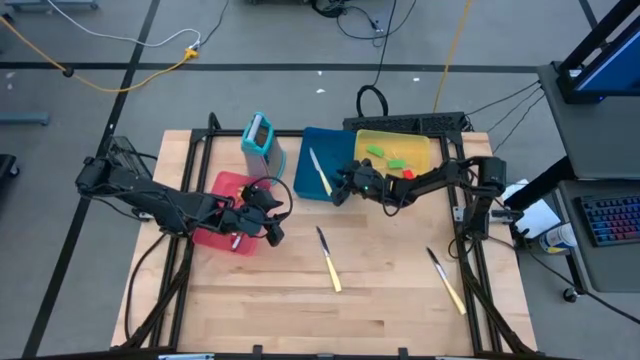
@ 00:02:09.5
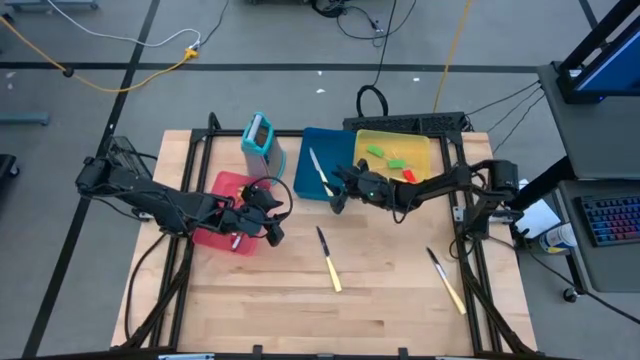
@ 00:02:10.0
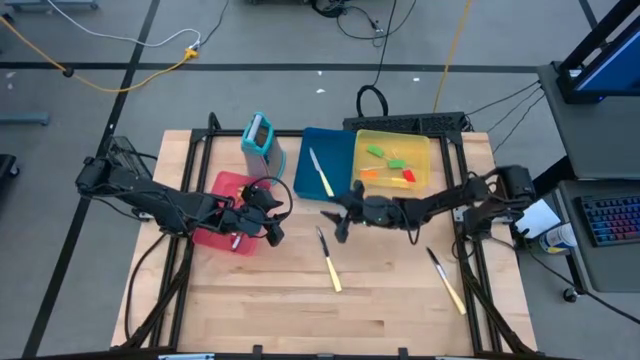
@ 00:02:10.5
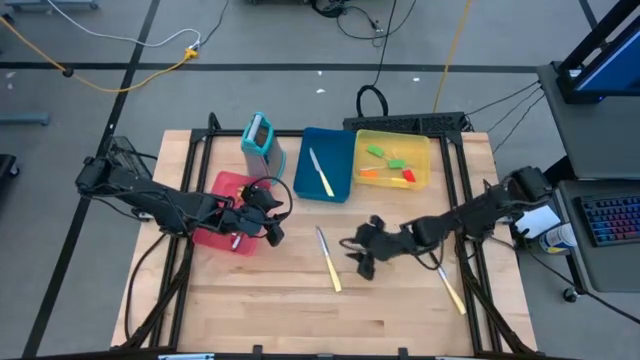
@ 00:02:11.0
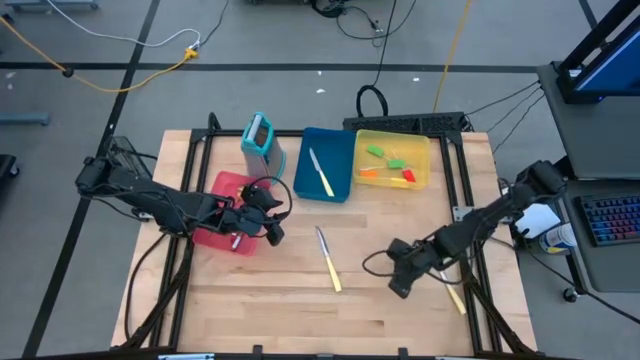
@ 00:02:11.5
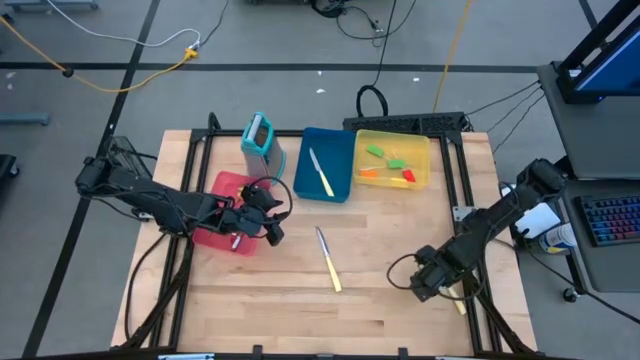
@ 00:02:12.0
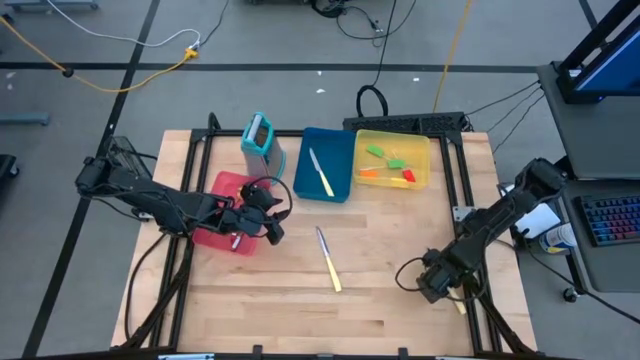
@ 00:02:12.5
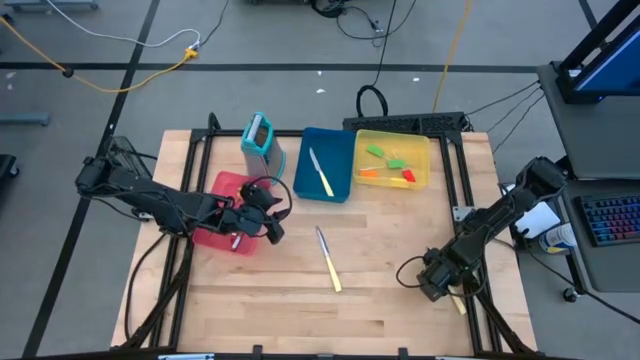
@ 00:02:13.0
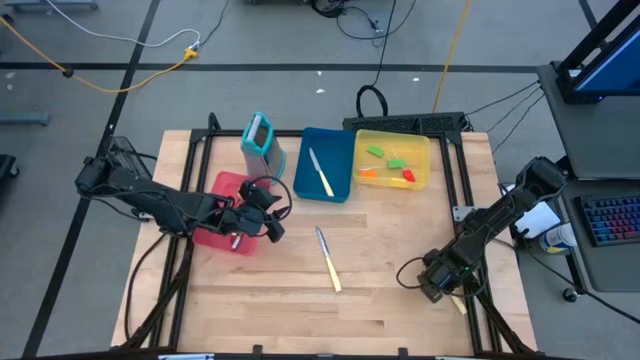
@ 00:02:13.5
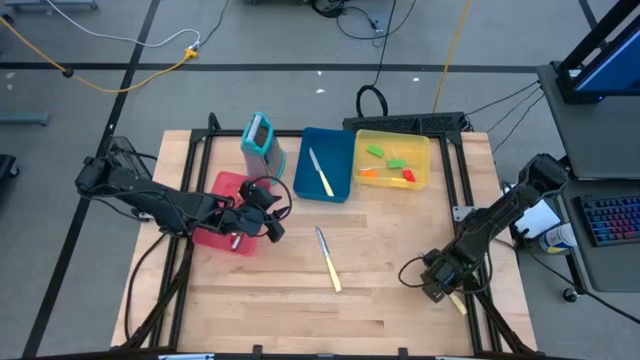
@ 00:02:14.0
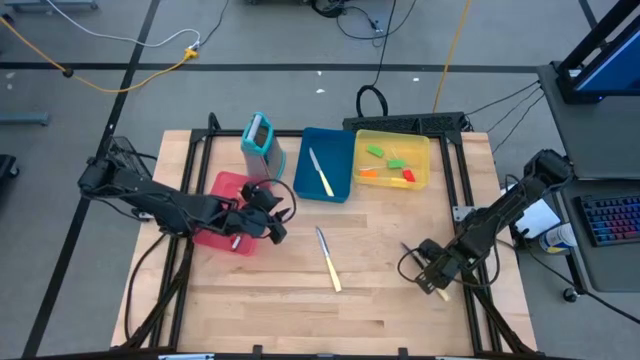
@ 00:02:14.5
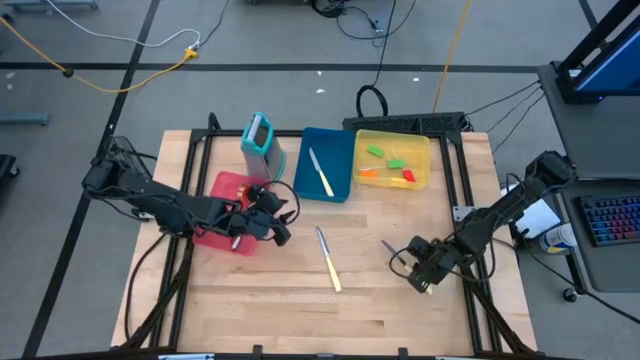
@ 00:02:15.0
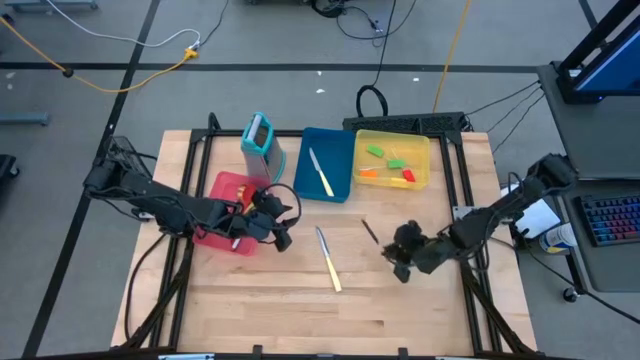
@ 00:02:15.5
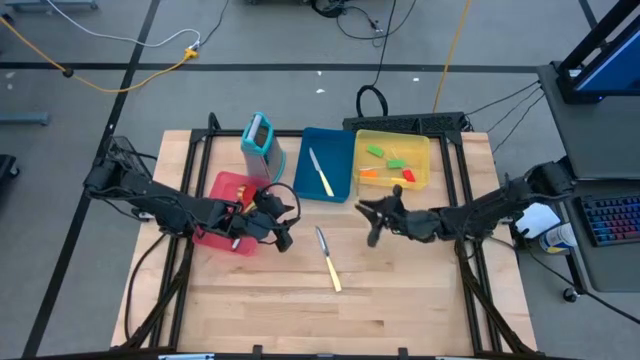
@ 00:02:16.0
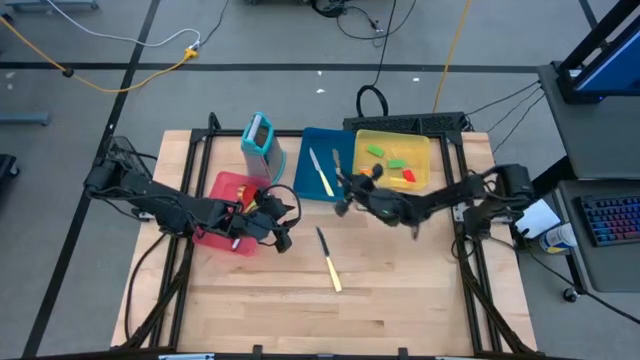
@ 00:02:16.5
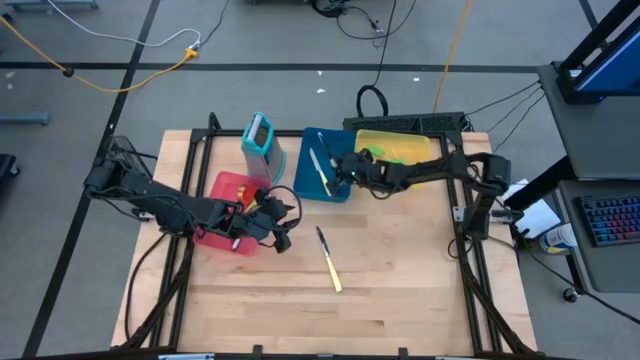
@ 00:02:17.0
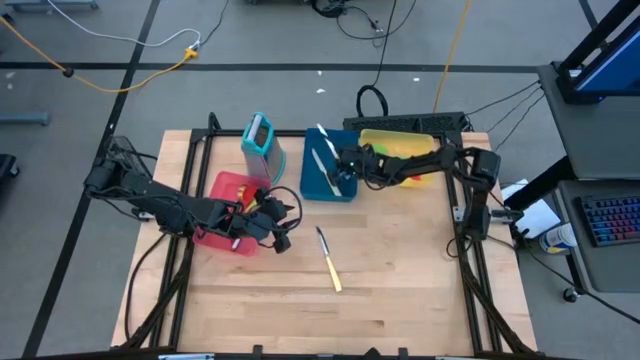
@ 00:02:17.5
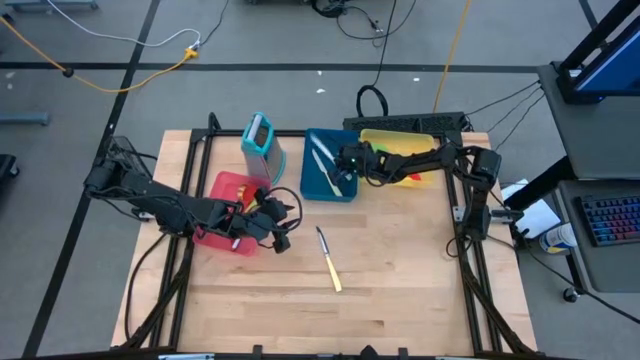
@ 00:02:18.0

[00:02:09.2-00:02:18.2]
Task: Pick & Place Kitchen Items
Put the right yellow table knife into the blue bin

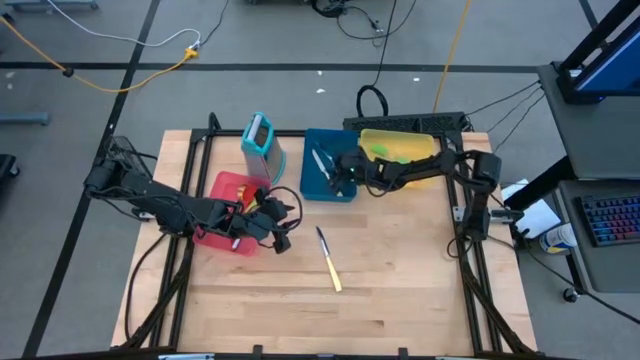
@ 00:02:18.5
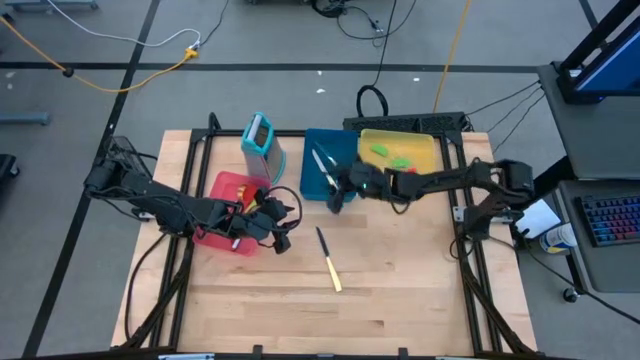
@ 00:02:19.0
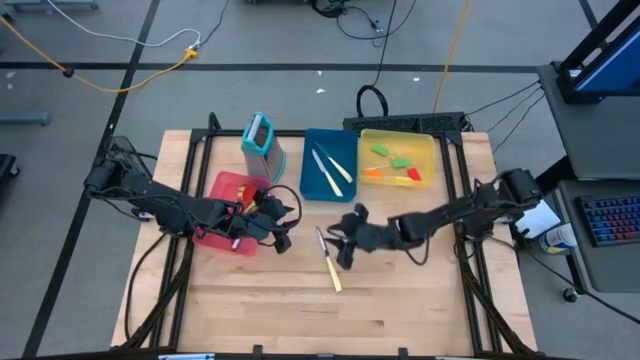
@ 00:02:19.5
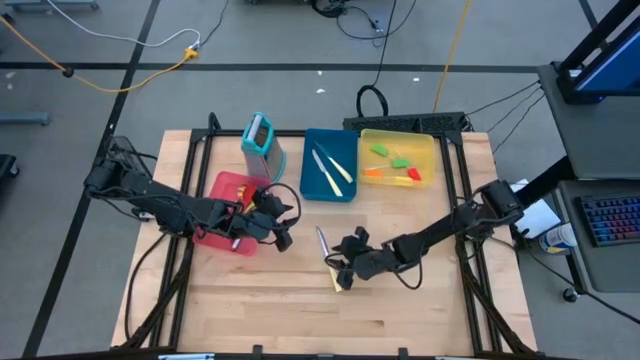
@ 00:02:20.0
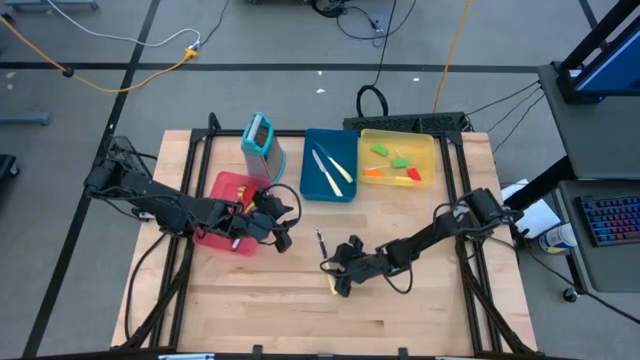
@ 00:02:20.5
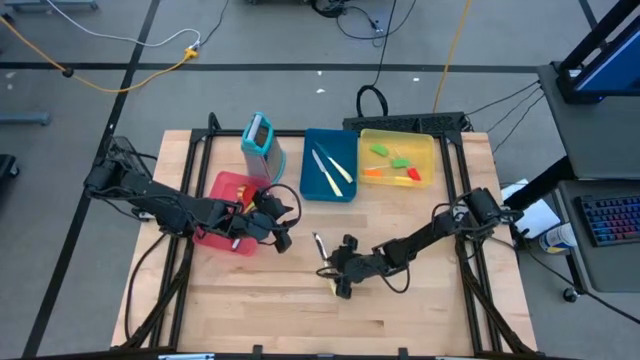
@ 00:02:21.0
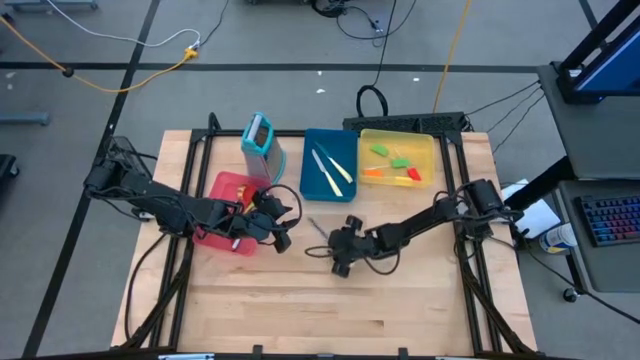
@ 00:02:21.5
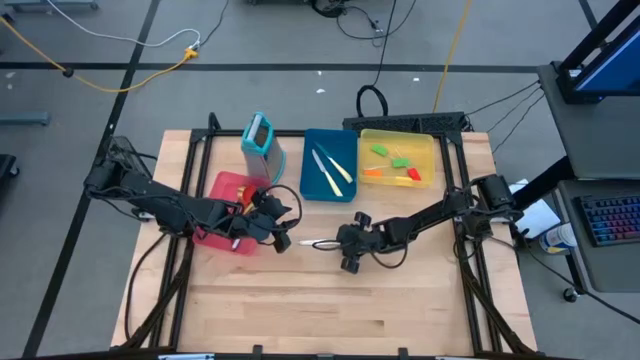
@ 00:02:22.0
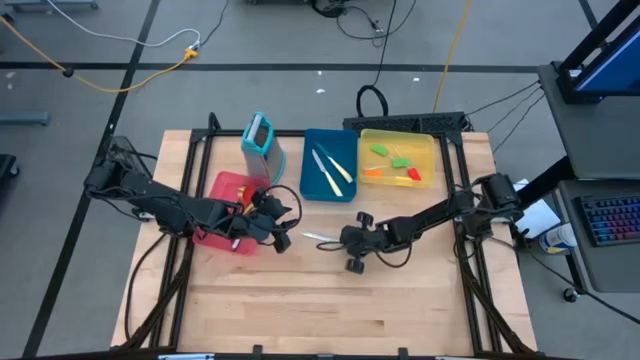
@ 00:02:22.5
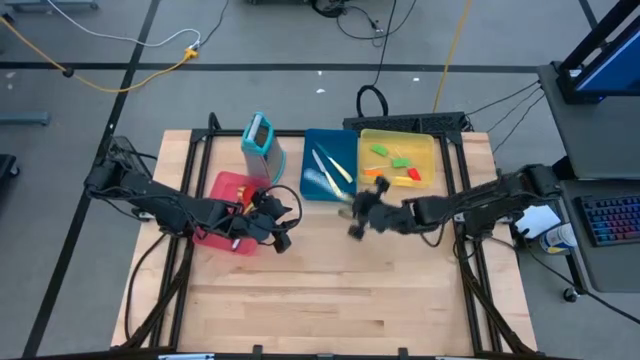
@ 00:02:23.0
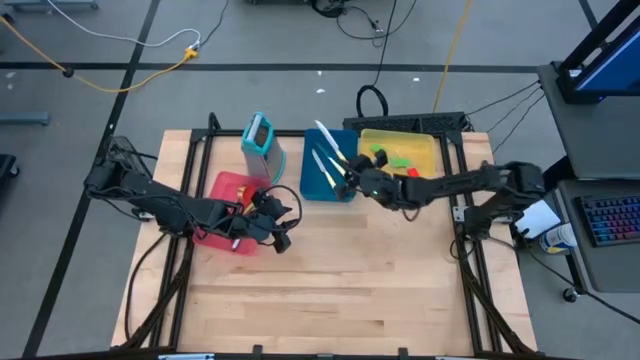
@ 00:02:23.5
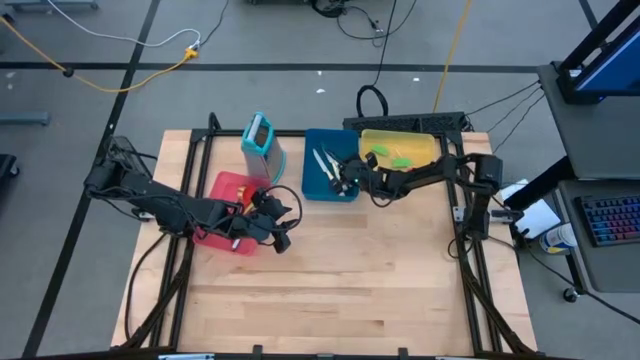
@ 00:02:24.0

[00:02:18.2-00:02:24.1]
Put the yellow table knife into the blue bin

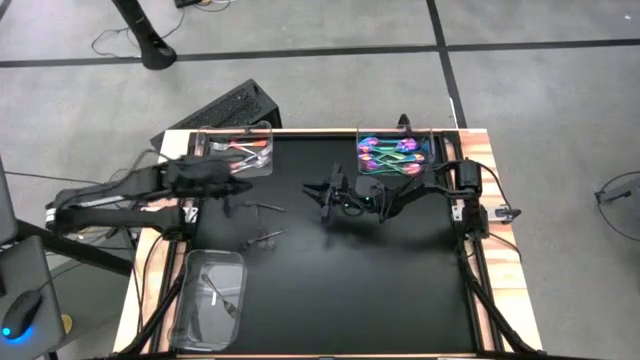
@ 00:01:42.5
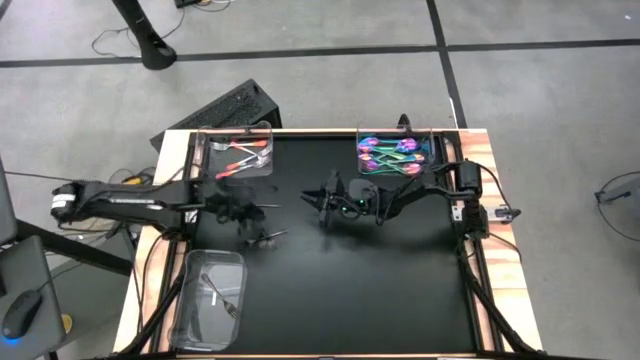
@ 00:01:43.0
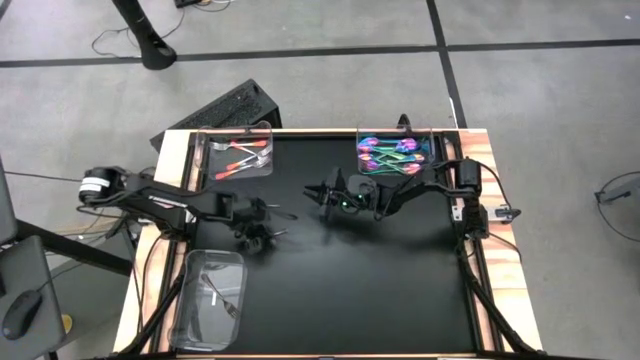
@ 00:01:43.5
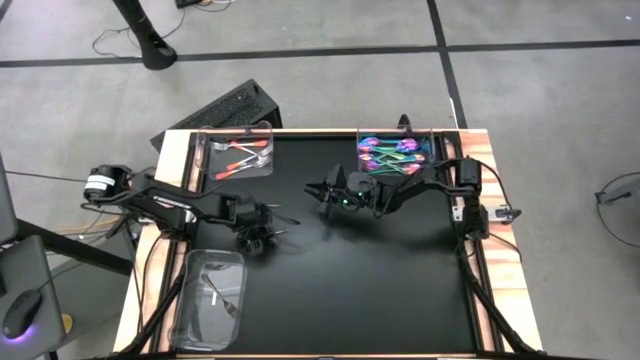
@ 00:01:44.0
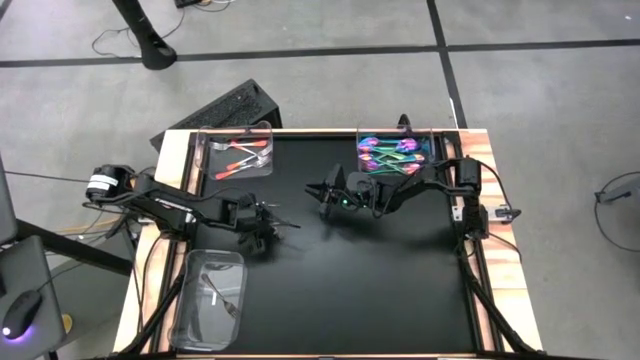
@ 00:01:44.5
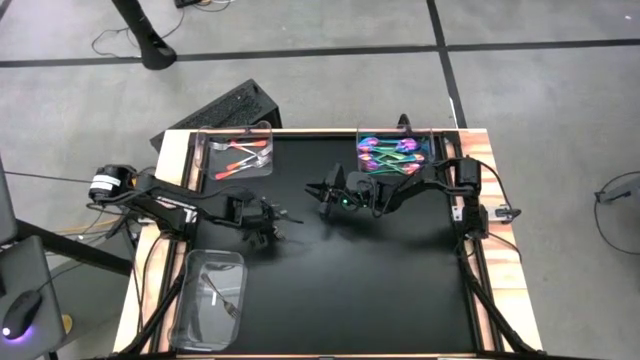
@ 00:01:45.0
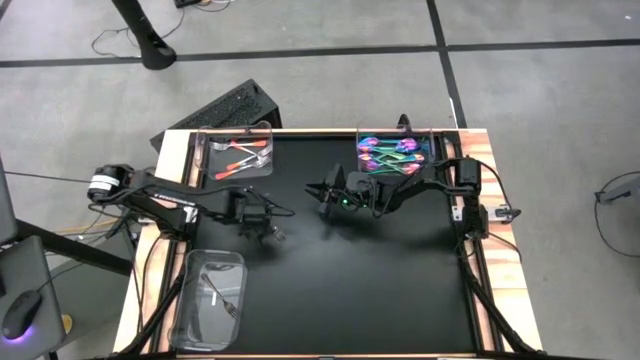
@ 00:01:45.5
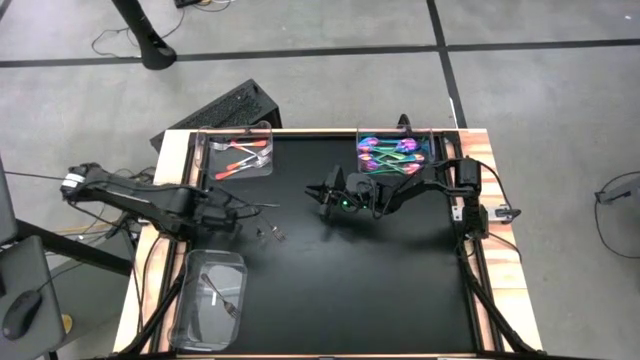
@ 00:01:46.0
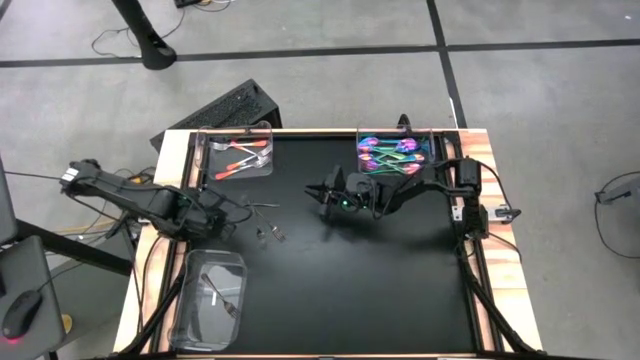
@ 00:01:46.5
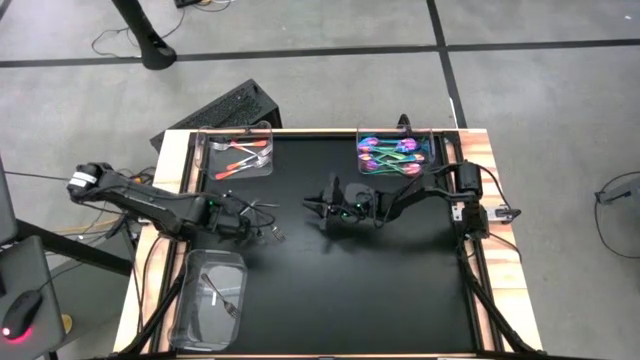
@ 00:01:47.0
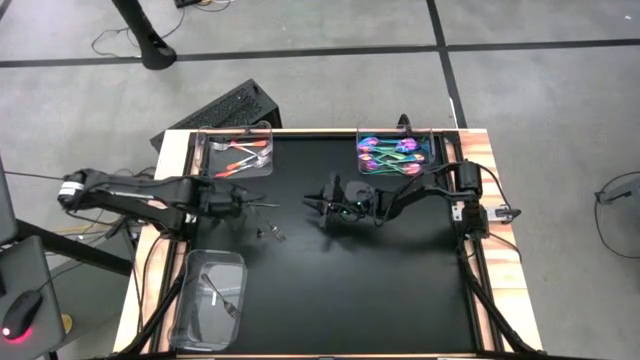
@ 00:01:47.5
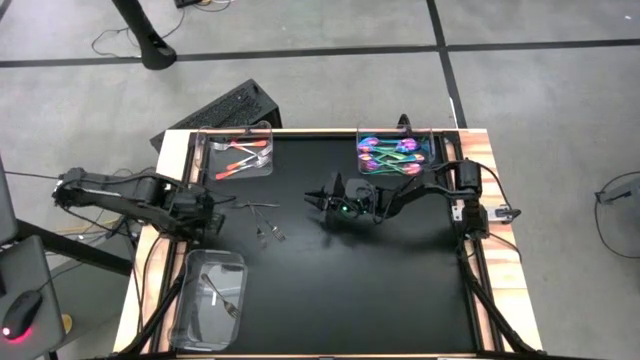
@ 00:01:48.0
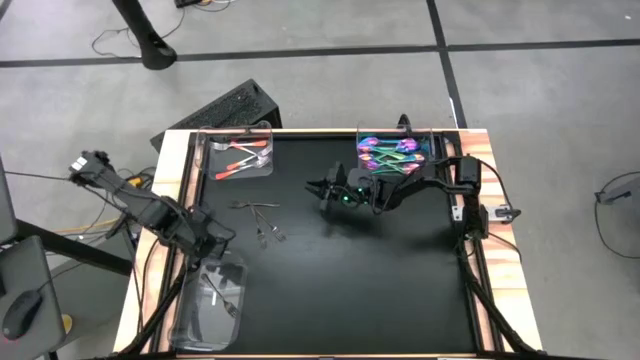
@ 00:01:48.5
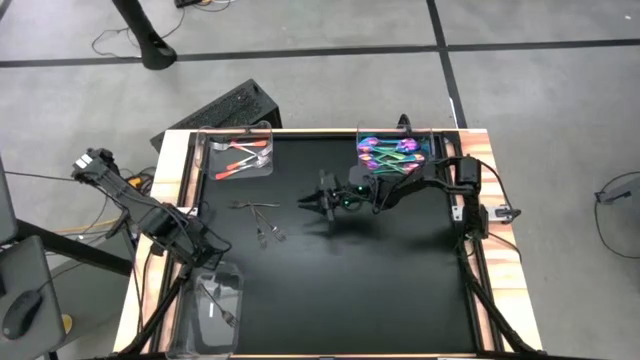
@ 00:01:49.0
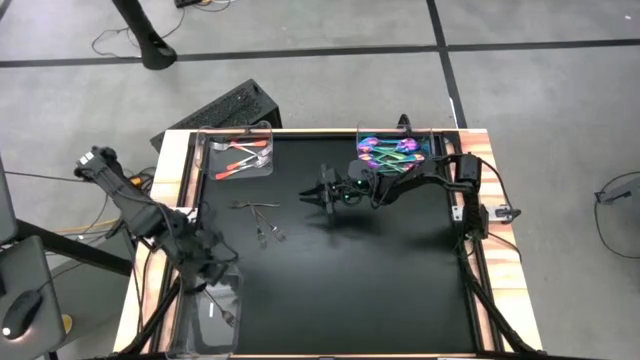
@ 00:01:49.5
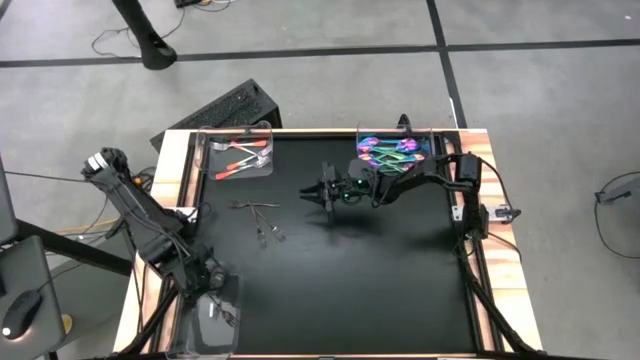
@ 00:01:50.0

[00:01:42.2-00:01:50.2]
Task: Sort silverware by color (type)
Put the black fork into bottom transparent bin
